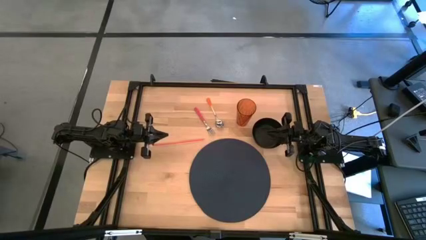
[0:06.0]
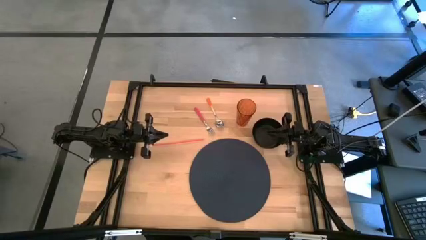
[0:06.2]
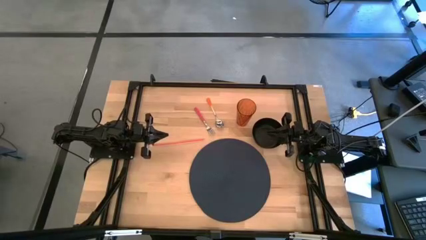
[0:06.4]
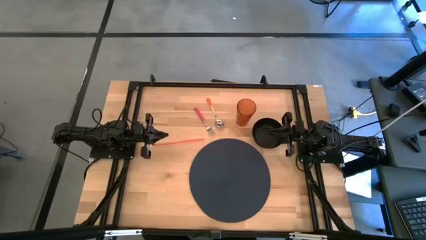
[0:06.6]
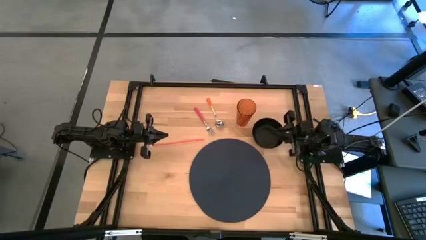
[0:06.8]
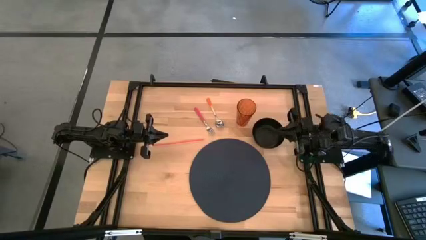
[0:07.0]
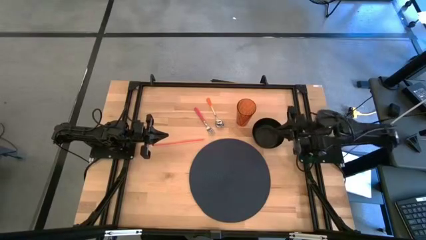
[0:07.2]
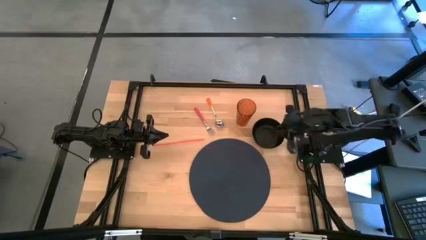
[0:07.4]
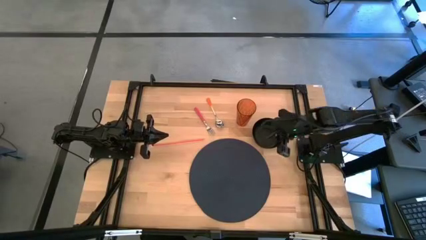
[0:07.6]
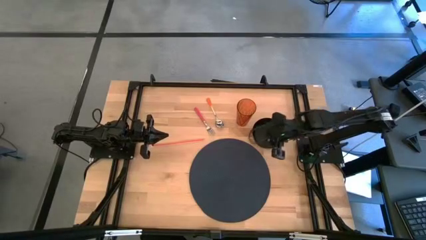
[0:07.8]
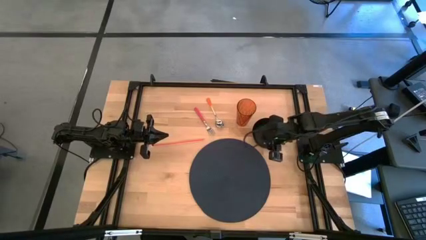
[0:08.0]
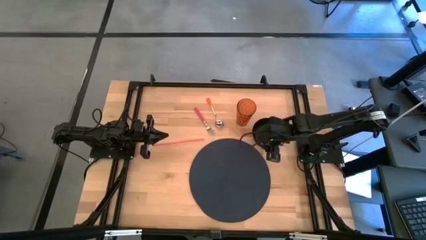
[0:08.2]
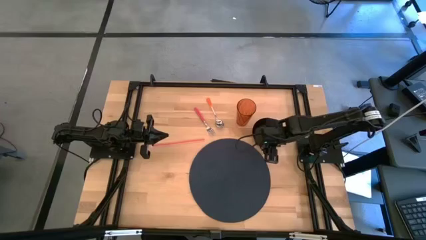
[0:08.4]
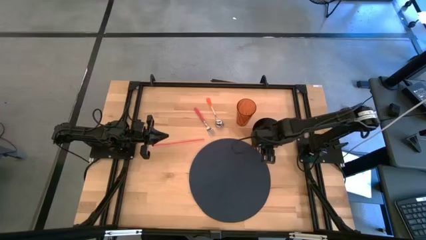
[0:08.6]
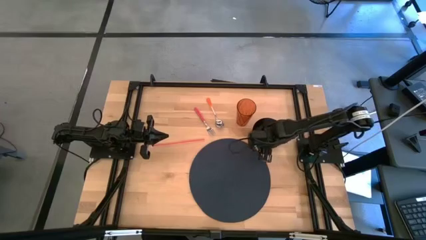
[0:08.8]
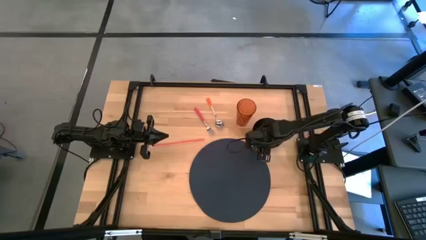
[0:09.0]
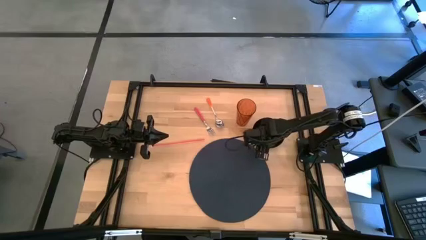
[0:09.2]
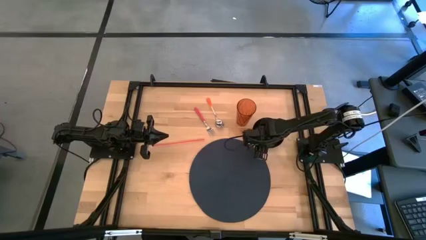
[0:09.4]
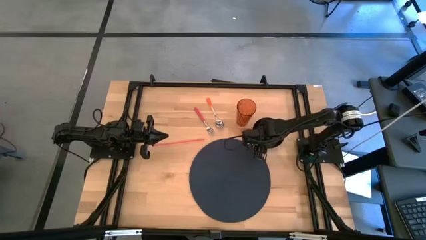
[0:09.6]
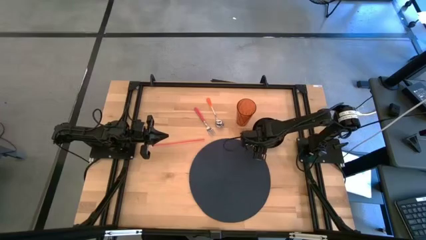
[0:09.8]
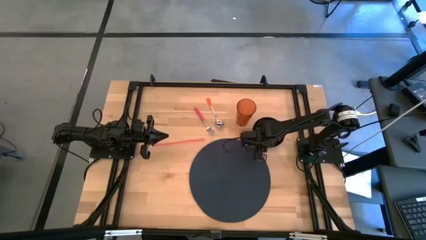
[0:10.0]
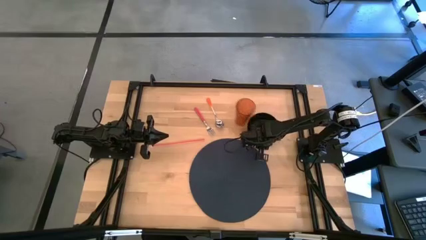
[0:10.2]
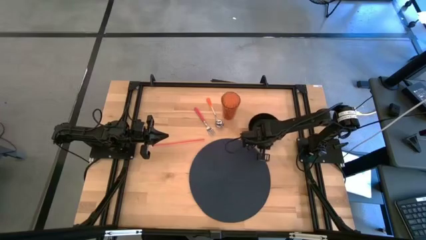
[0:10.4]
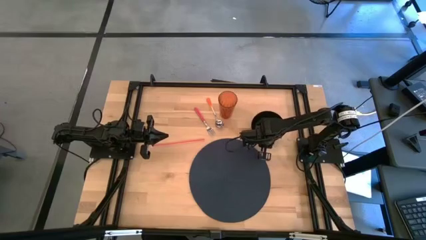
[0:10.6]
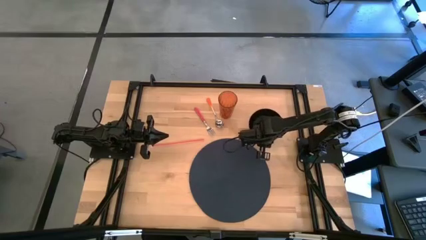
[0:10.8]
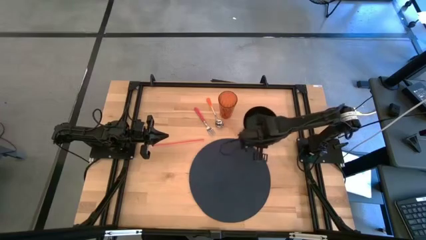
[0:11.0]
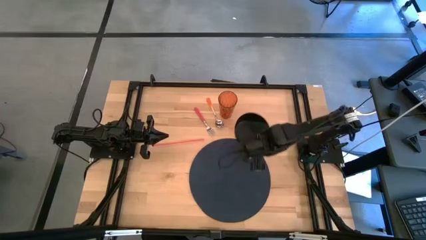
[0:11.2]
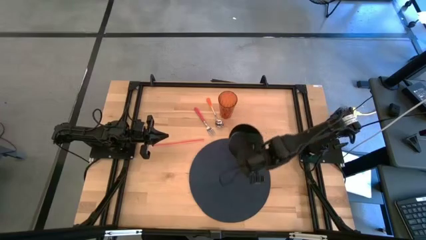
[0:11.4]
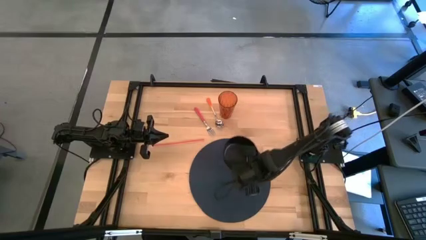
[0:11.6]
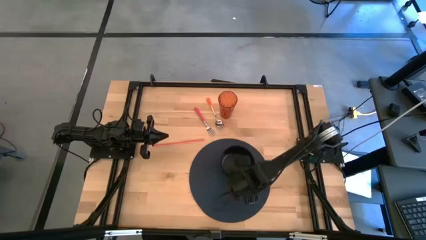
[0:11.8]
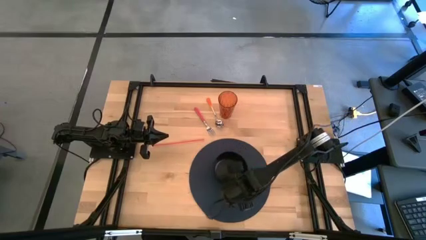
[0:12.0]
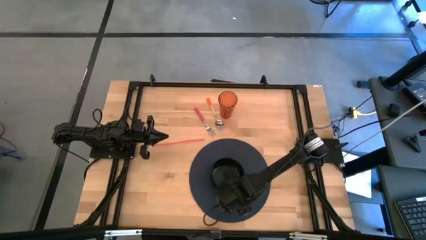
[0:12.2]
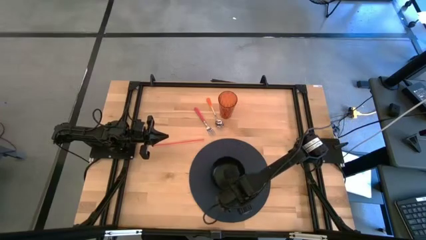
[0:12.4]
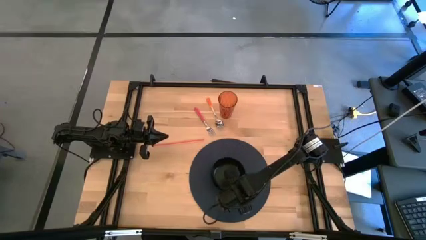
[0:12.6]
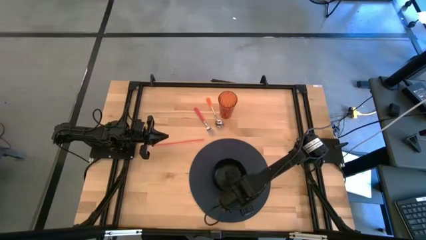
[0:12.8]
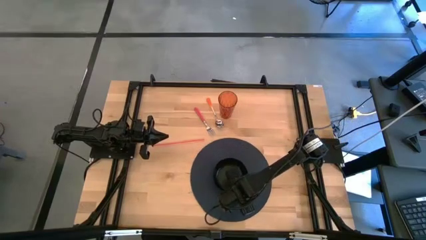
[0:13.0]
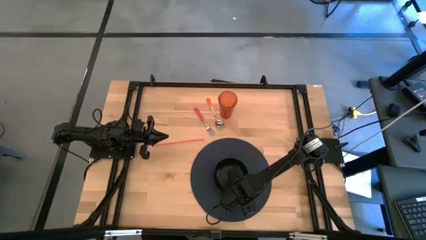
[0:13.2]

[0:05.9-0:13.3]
Task: Pick & Place Utensil
Put the black bowl on the black placemat

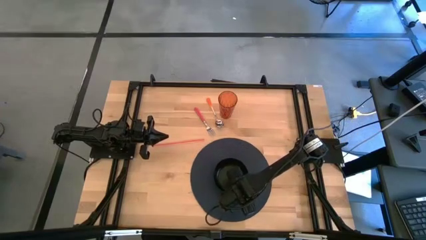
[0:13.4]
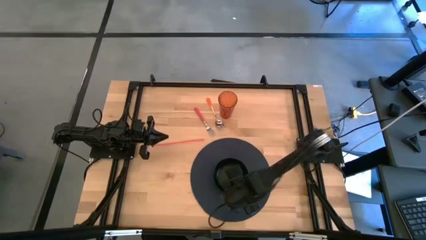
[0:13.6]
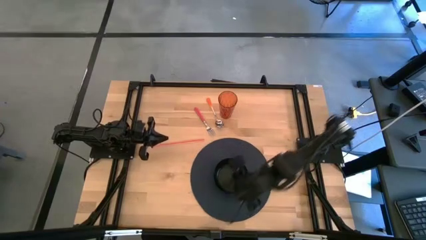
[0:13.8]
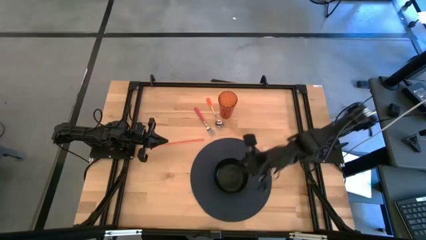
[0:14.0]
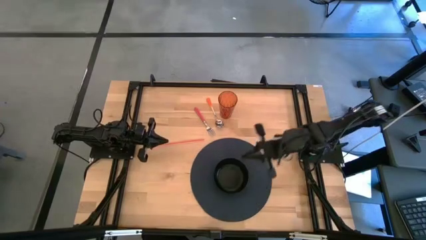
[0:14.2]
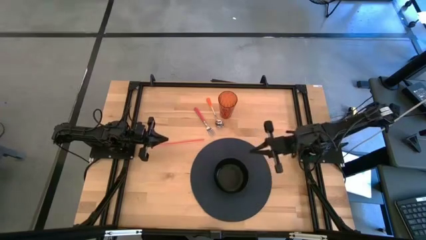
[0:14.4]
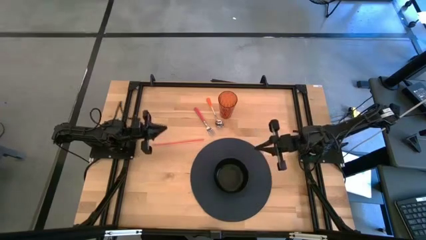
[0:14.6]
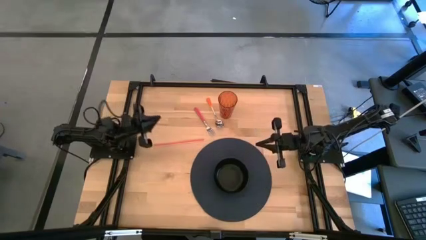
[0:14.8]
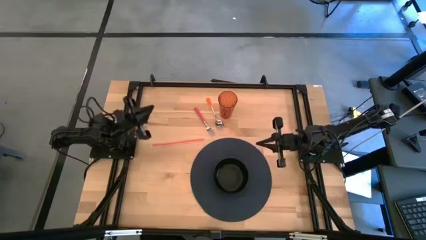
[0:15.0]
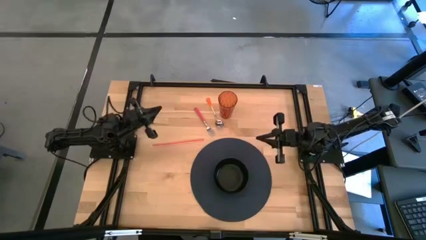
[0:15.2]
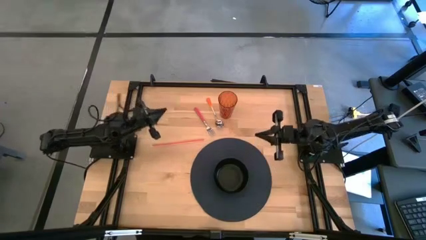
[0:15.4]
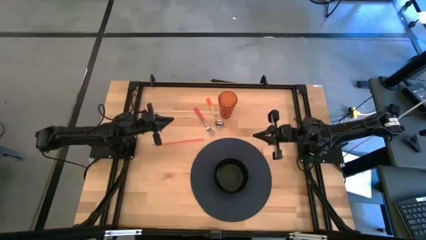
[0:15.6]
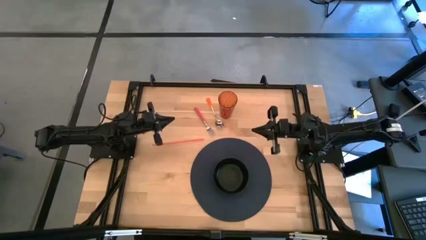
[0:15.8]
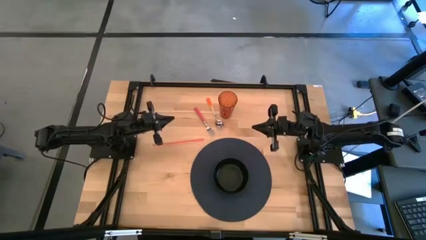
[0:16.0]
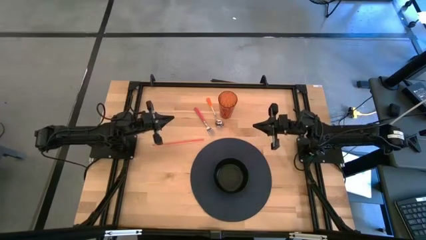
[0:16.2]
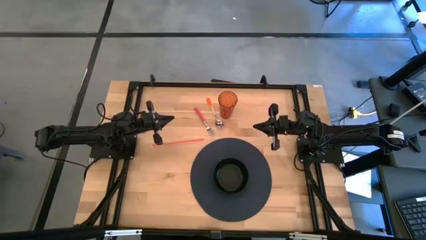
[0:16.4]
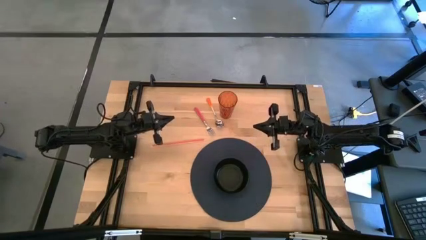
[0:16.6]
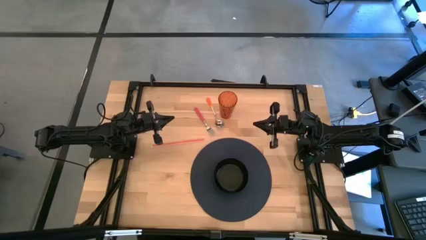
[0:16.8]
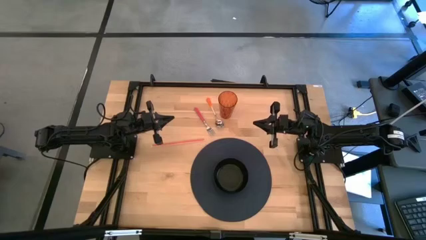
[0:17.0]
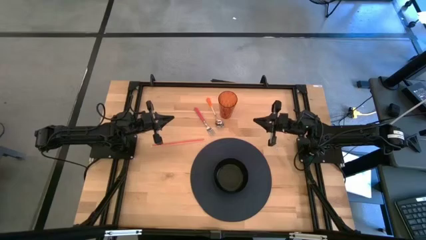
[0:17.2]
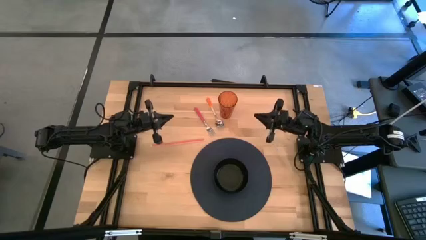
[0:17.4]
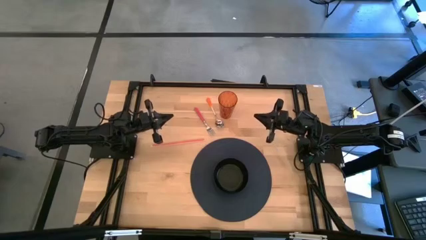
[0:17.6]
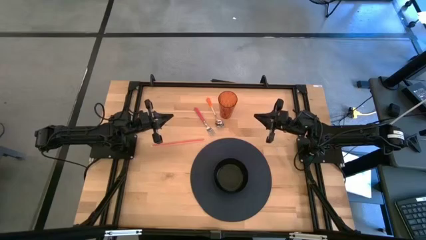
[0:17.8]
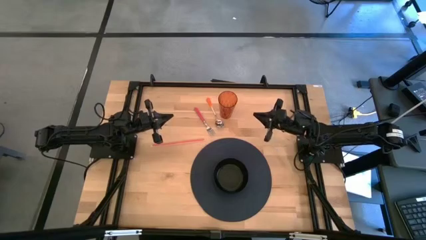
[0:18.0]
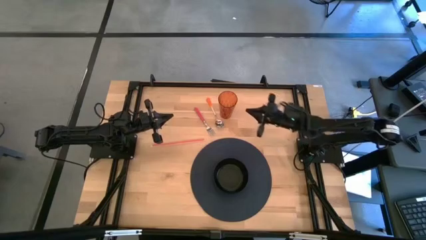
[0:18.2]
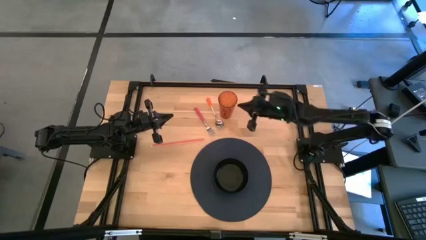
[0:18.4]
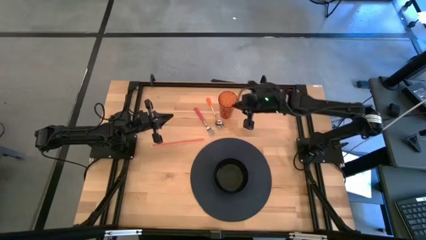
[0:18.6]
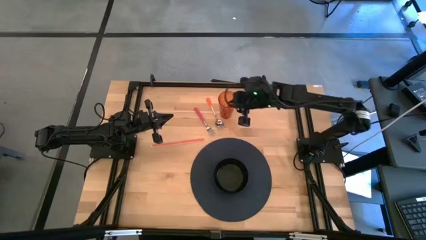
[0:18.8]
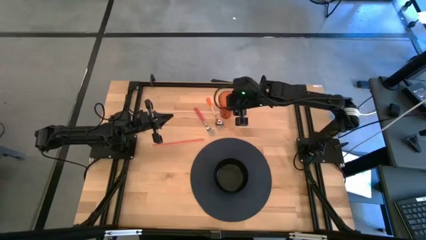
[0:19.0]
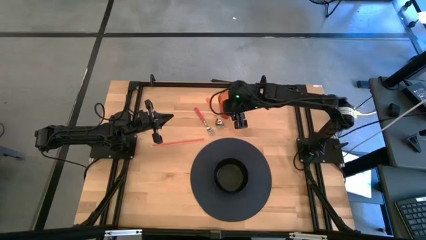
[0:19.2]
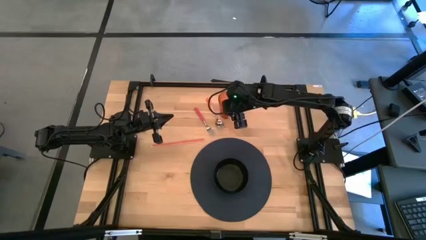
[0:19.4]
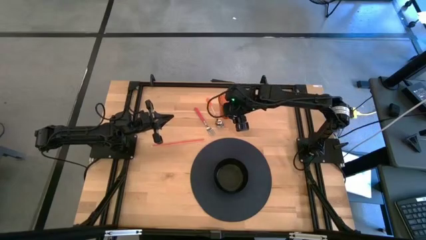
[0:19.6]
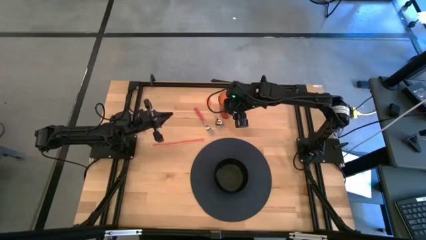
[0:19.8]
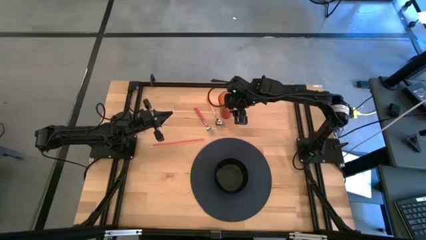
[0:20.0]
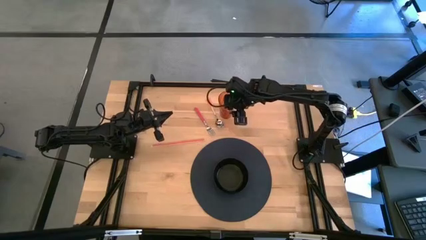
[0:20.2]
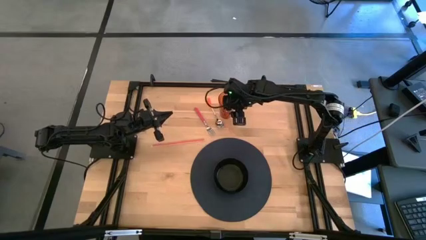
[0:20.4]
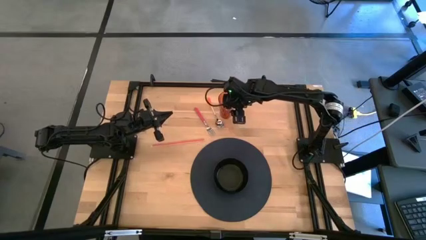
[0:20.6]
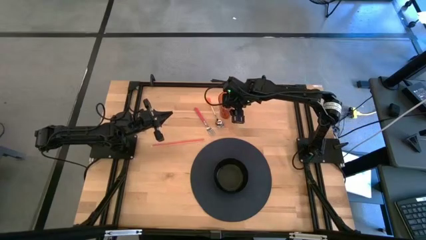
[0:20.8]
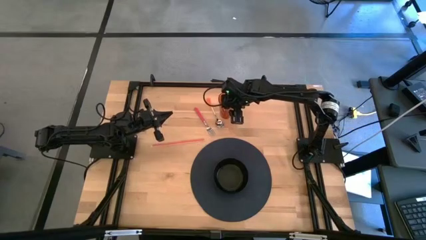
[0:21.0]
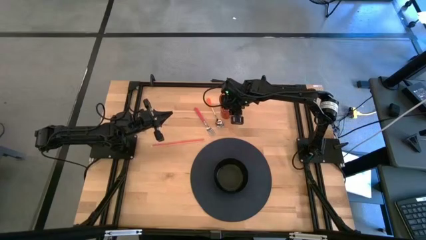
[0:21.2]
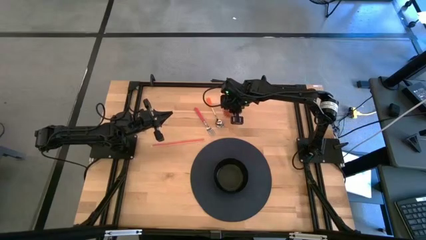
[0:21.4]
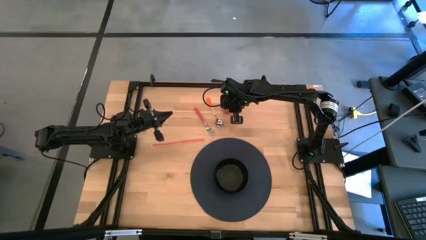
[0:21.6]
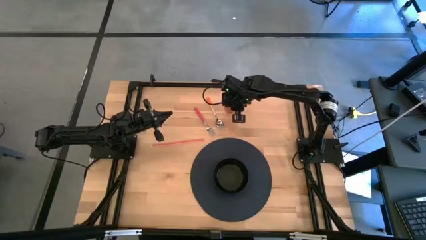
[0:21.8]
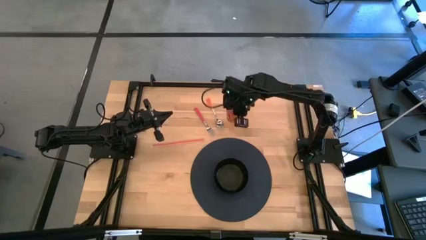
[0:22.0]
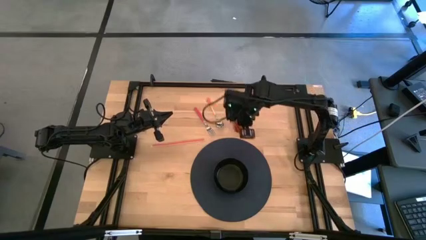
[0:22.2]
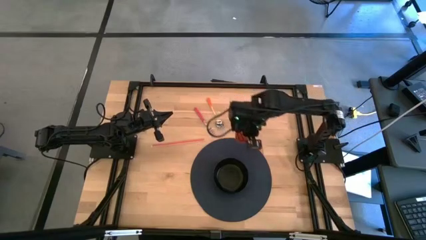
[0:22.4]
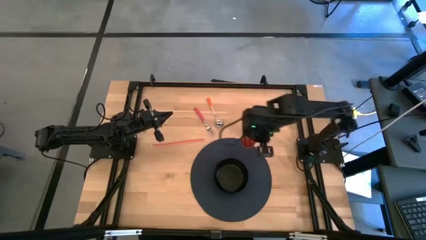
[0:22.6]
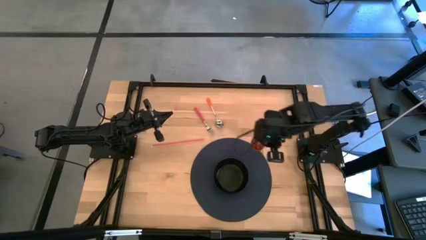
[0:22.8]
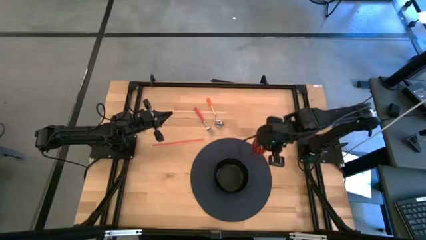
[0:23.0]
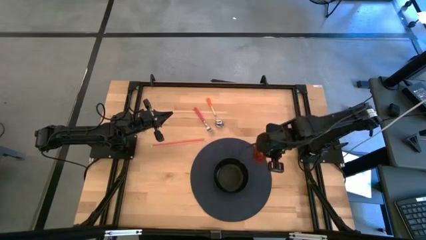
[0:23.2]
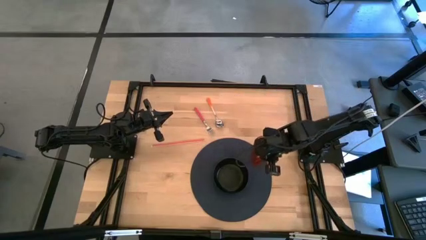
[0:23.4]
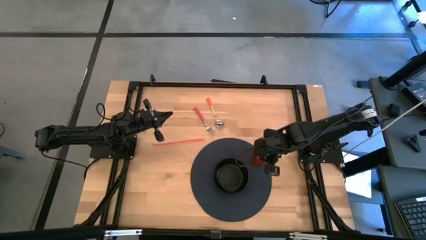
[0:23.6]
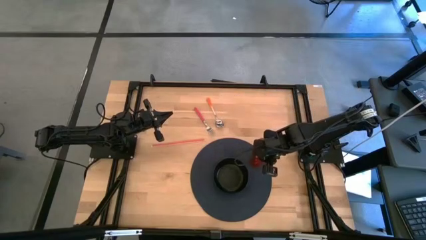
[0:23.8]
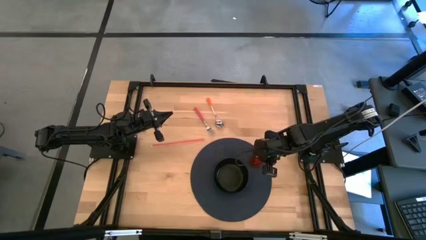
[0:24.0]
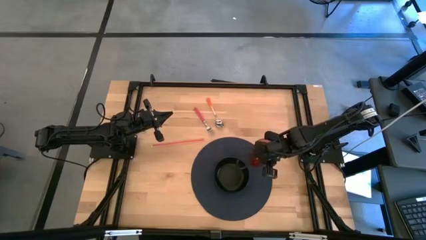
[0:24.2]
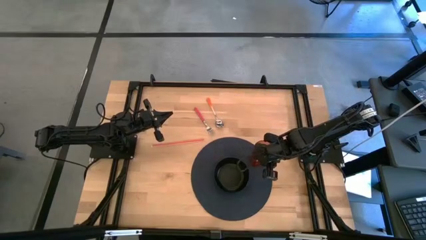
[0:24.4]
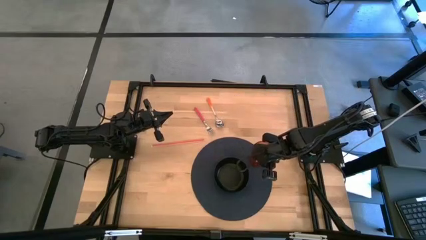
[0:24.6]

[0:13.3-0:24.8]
Put the orange cup on the top right of the black placemat
